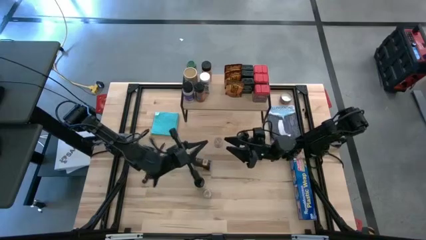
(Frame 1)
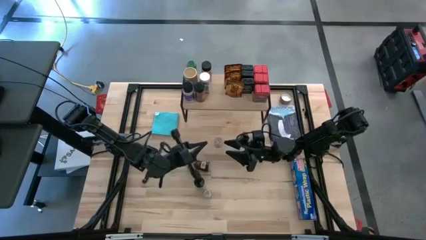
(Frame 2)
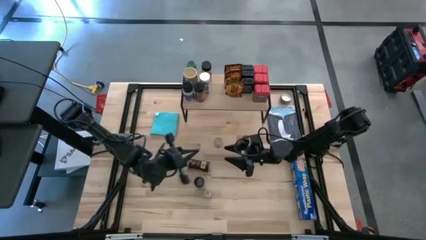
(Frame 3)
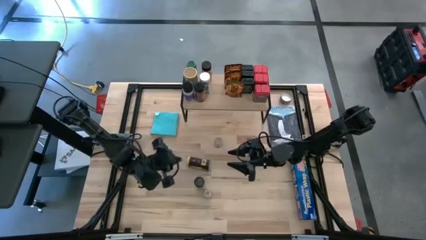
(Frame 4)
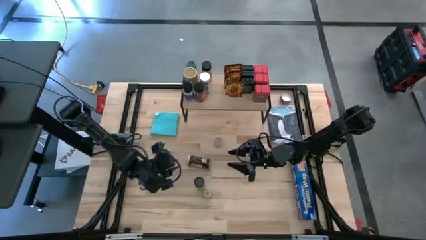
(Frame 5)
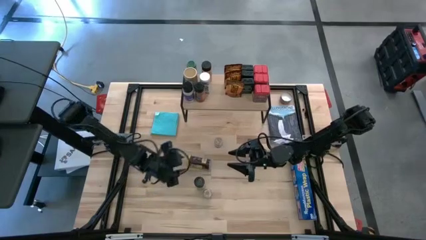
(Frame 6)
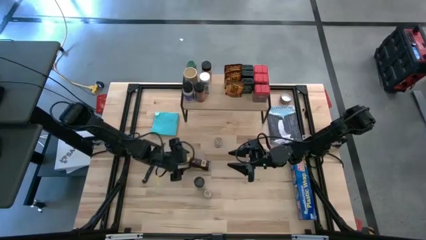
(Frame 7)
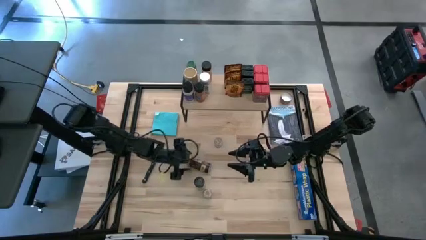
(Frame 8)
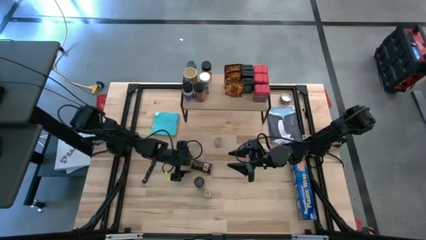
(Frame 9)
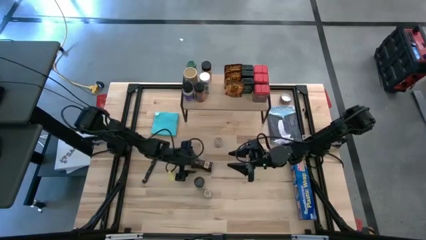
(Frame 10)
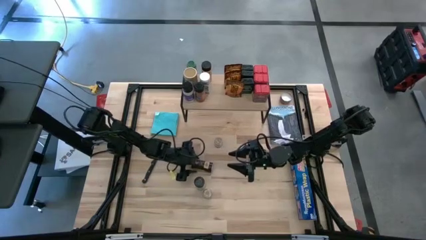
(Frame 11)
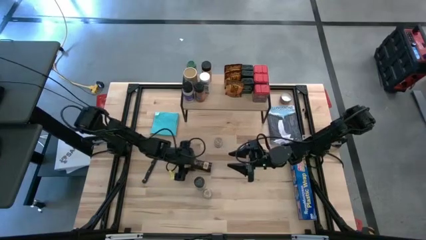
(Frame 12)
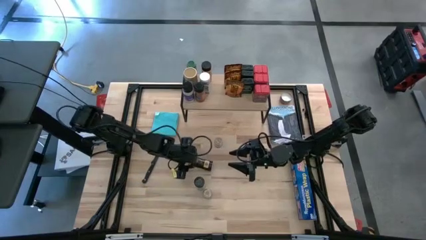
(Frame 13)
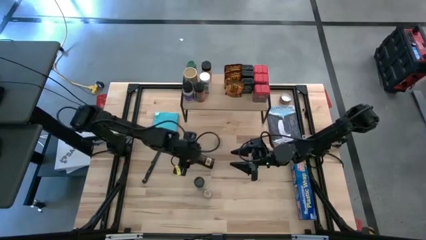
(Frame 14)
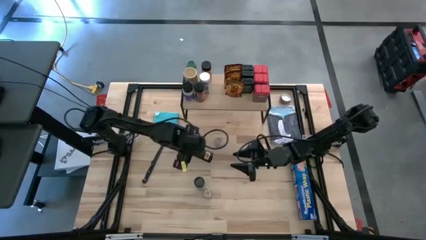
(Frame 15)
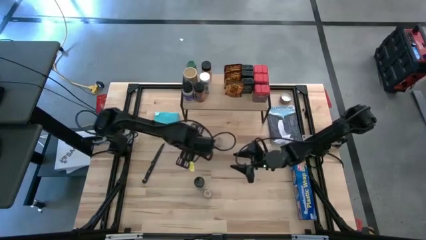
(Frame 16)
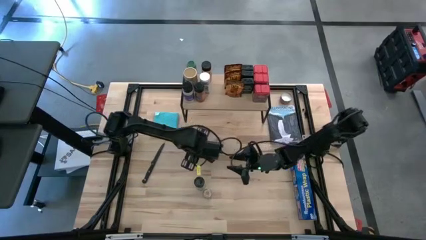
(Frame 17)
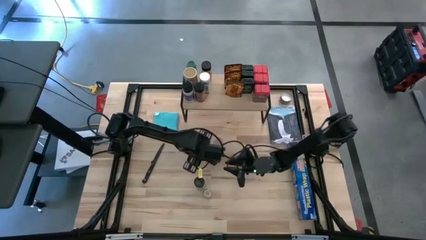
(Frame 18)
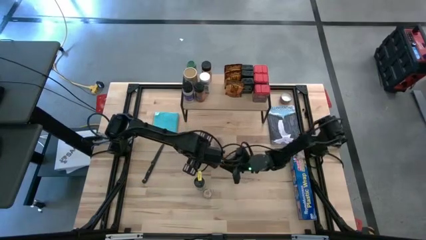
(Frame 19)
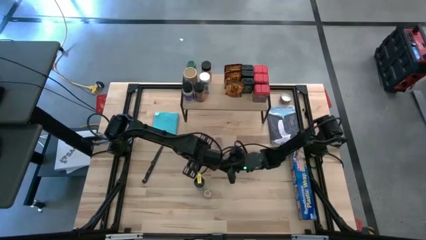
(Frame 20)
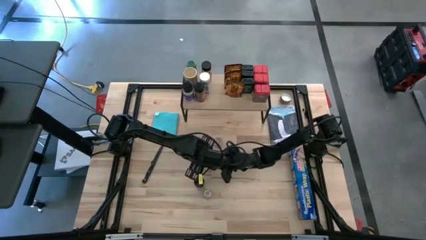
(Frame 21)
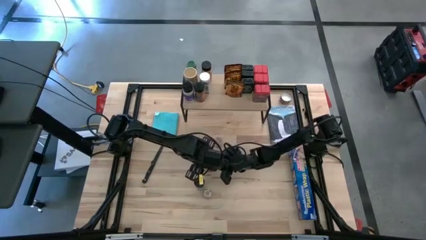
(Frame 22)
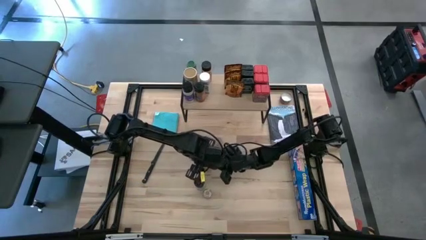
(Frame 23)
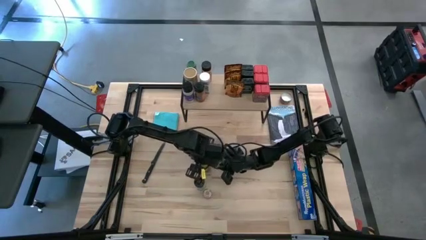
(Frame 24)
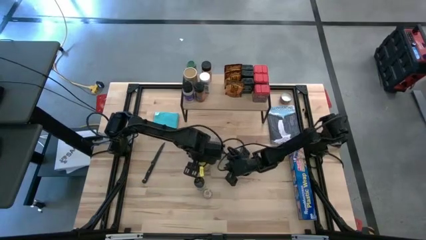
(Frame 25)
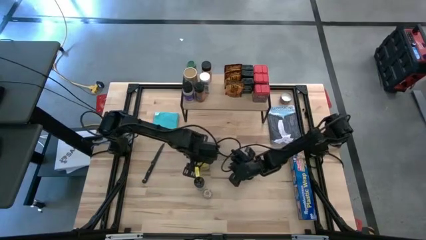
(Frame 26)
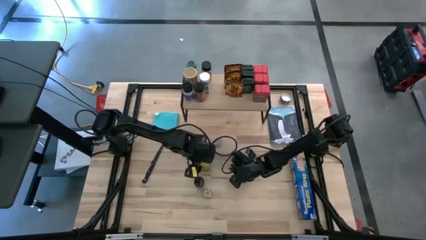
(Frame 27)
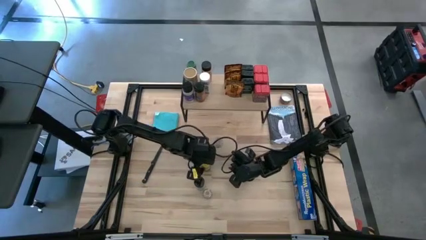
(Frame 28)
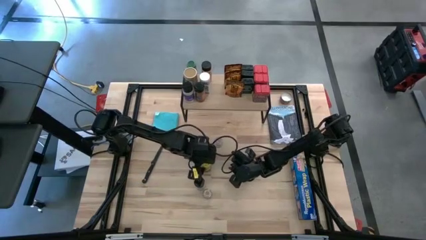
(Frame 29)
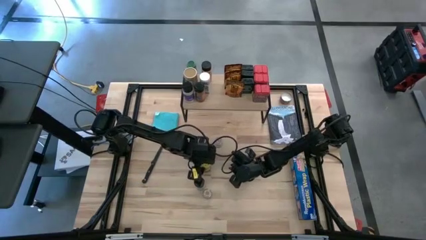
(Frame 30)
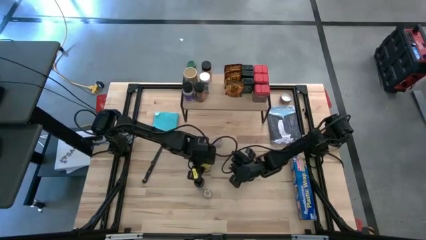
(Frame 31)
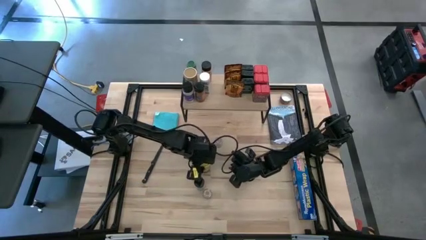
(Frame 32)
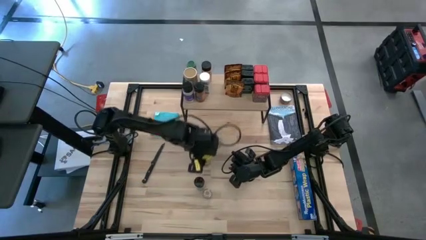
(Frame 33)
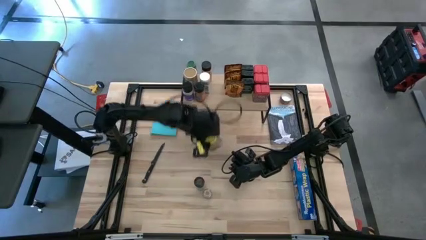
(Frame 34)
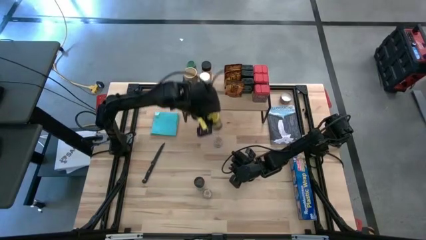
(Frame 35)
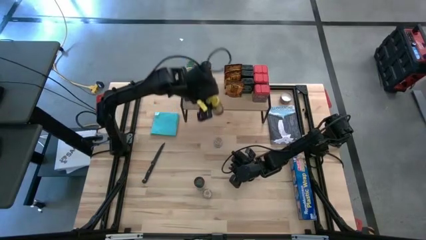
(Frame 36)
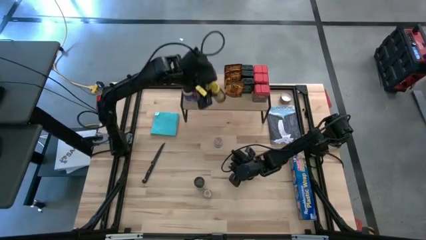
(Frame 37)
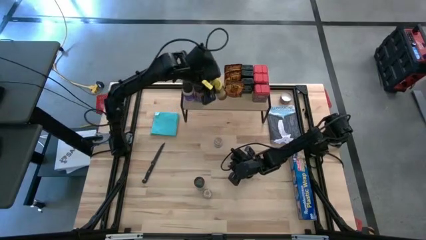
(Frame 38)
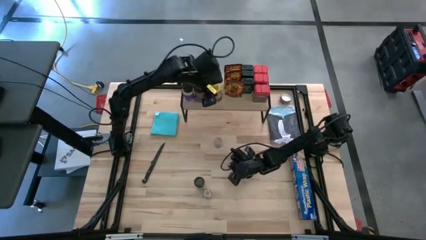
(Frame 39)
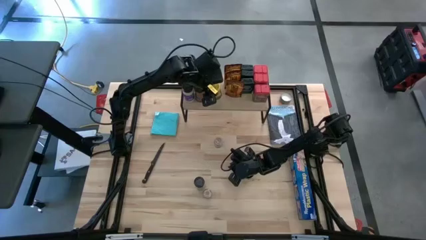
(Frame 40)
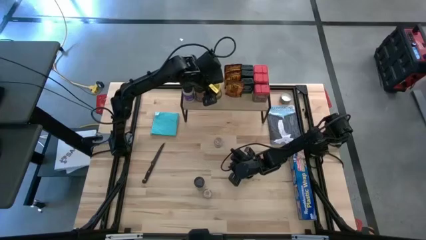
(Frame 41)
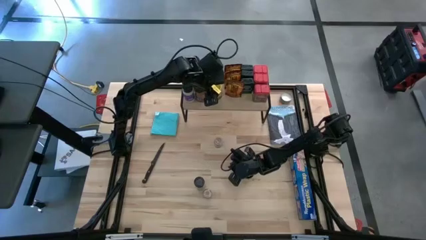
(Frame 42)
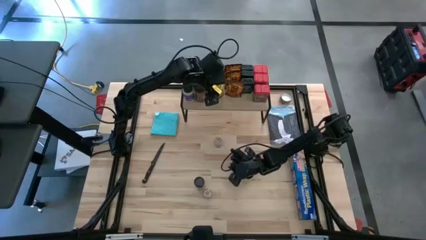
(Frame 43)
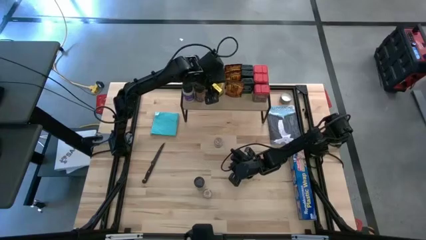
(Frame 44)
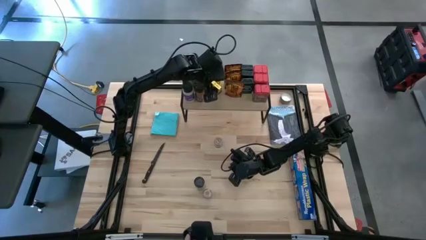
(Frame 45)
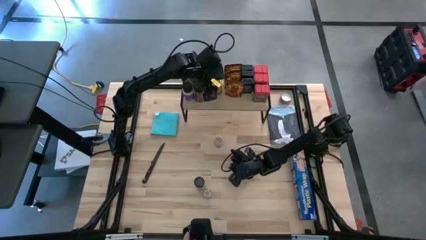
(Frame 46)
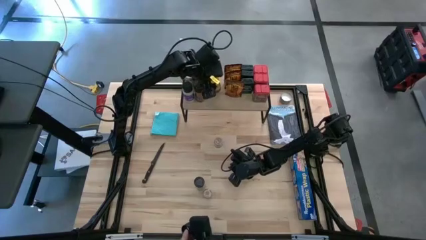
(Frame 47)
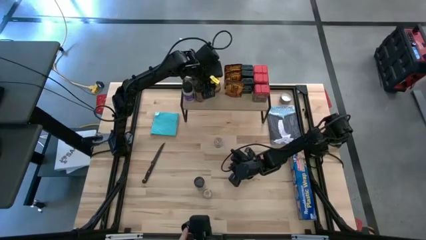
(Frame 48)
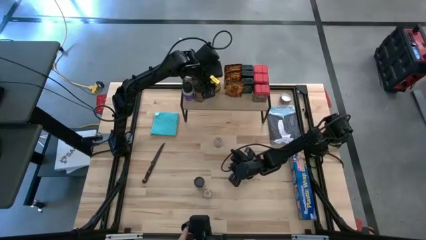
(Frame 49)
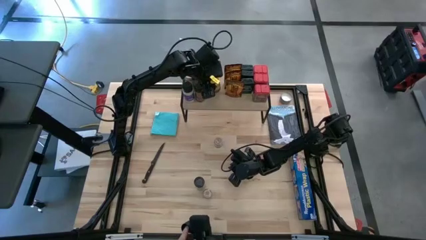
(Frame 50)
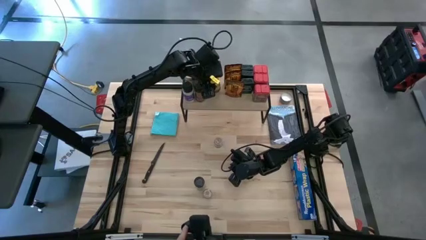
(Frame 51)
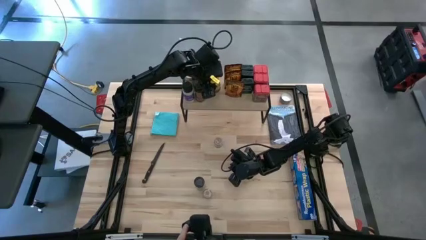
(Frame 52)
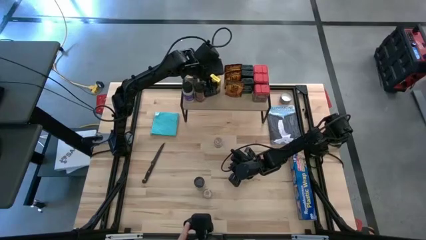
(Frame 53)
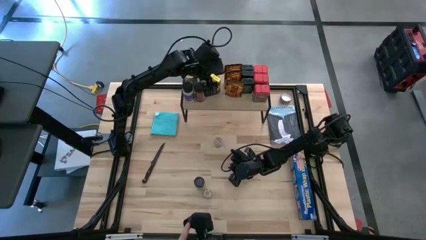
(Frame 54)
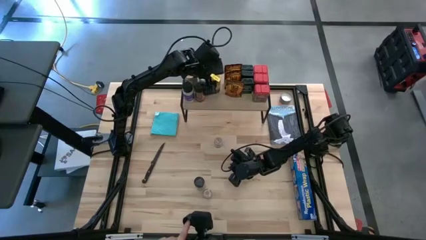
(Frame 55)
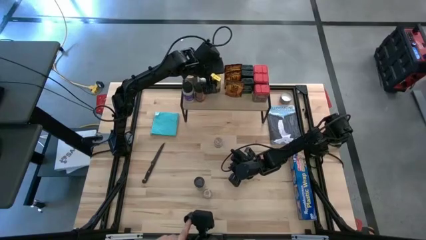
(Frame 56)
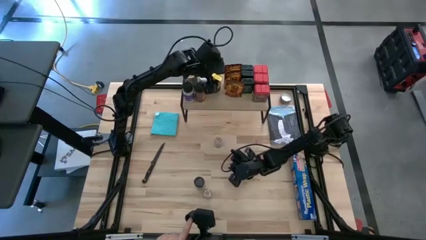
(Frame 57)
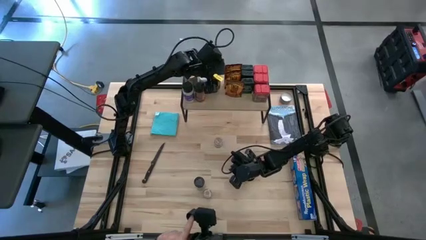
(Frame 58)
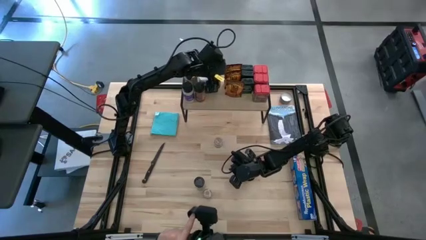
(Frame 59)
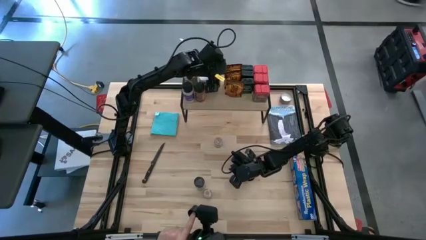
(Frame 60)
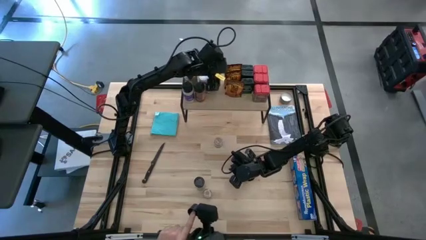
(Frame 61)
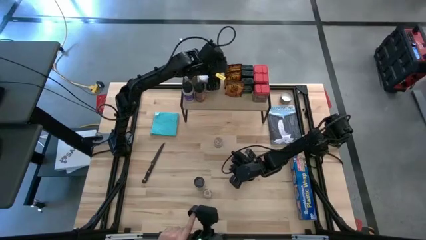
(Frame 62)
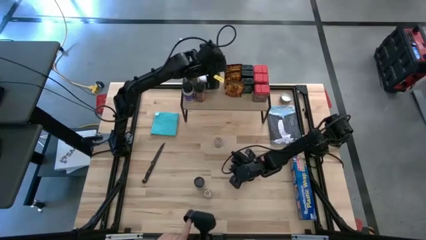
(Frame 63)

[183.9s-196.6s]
Task: Shelf spices
Put the yellow seasoning bottle on the shelf

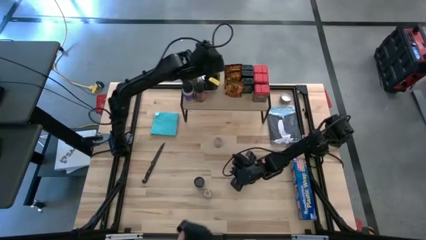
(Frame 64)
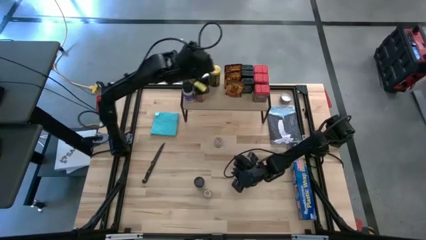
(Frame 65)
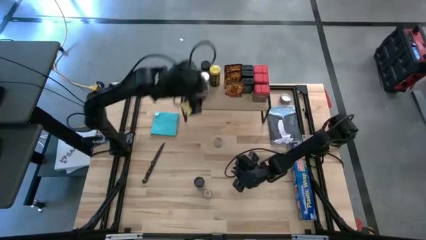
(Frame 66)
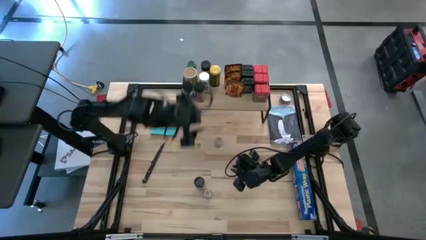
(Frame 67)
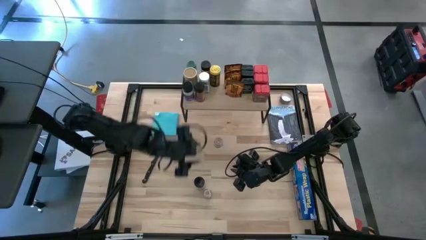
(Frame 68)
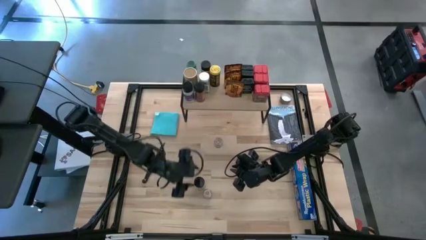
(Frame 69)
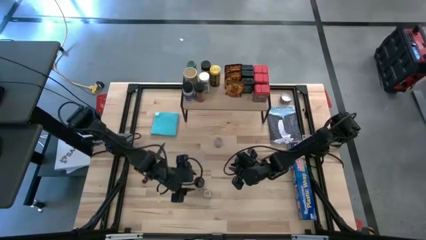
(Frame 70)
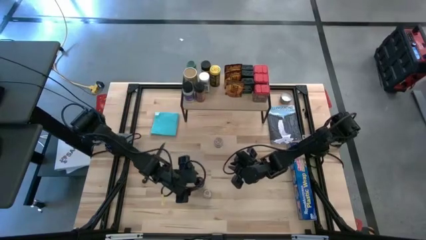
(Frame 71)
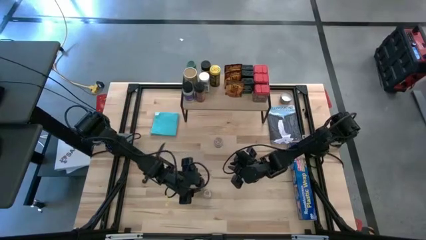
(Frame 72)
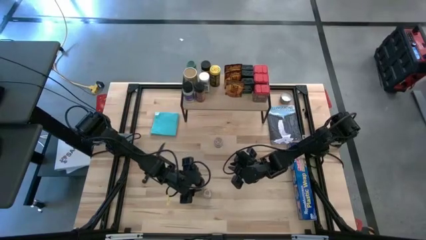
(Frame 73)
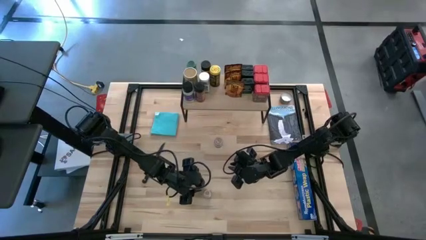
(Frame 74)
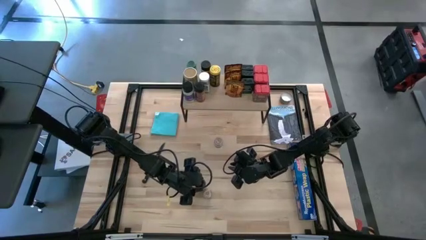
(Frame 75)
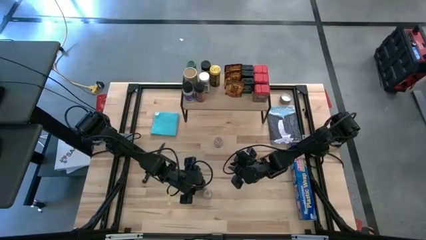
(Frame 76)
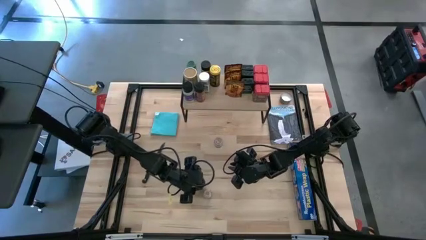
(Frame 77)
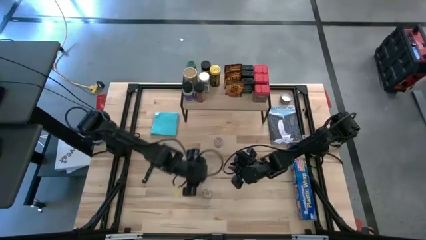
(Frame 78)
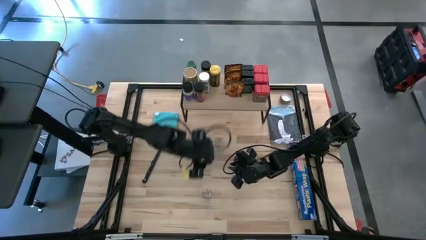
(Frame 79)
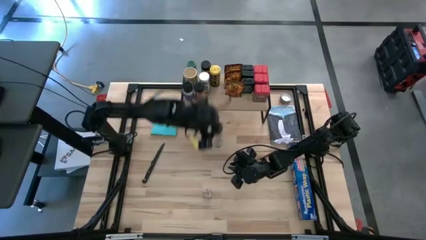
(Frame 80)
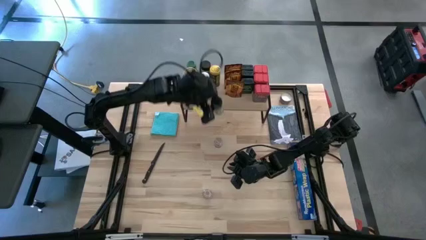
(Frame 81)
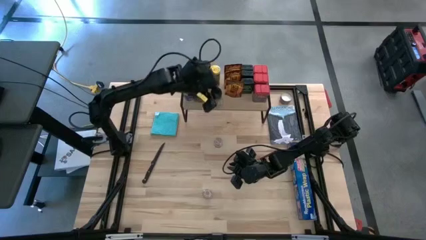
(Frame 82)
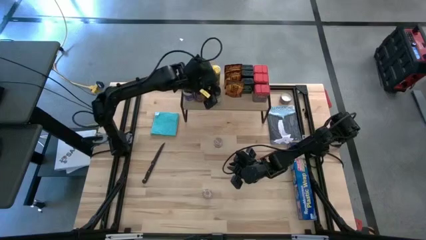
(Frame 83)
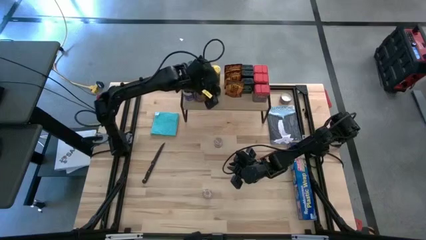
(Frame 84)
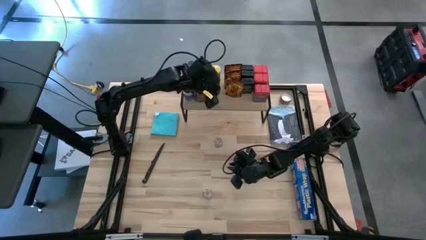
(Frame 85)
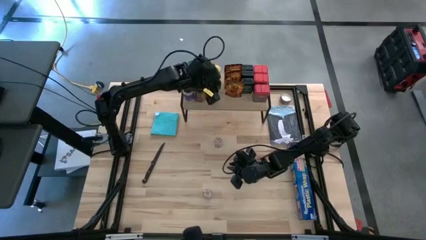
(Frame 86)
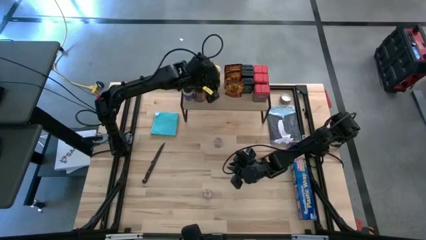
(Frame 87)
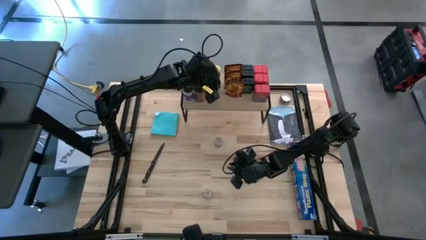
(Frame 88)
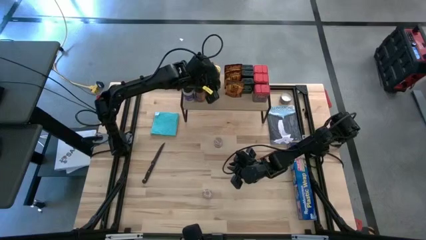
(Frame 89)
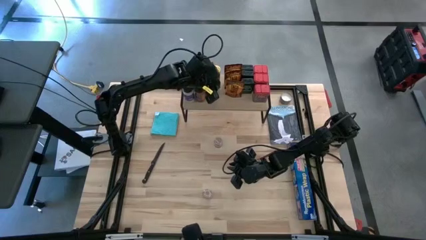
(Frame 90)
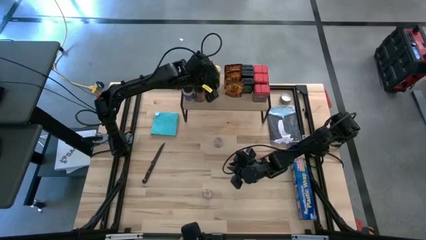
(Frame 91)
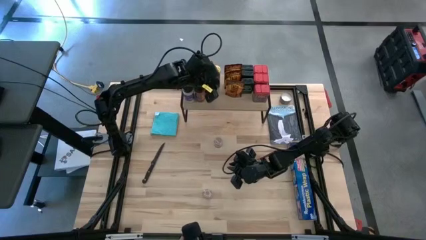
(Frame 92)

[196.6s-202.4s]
Put the black seasoning bottle on the shelf
